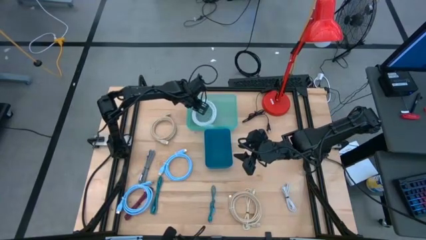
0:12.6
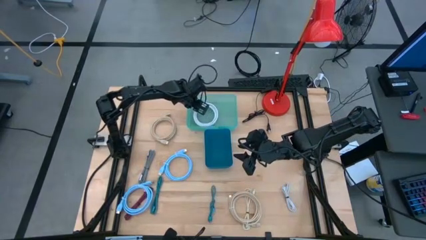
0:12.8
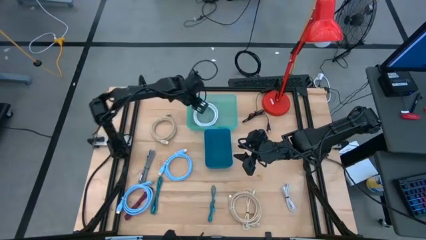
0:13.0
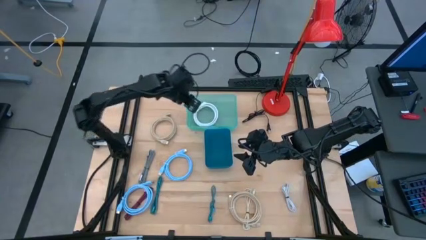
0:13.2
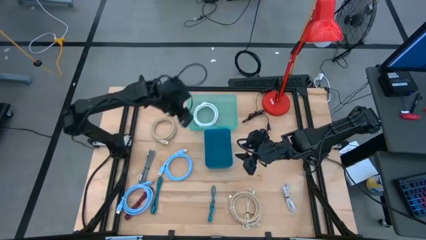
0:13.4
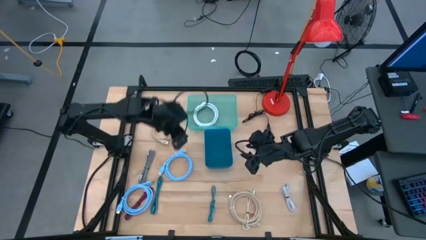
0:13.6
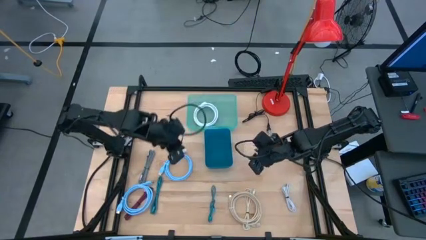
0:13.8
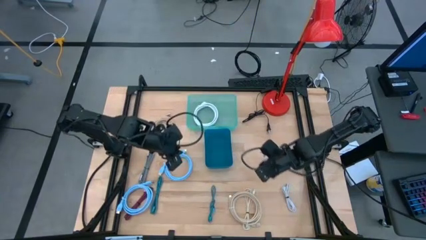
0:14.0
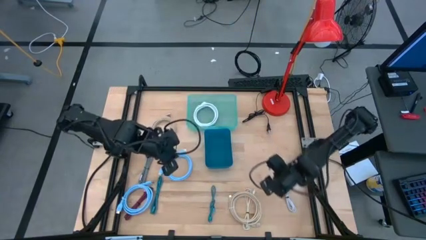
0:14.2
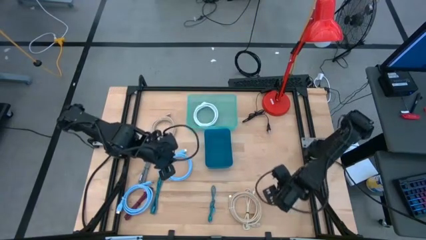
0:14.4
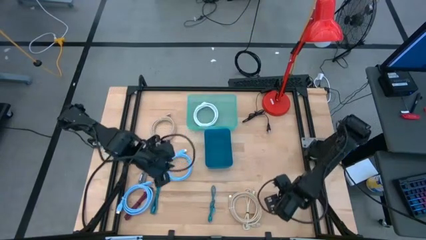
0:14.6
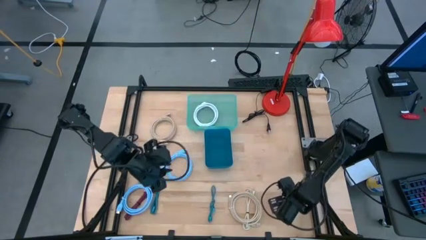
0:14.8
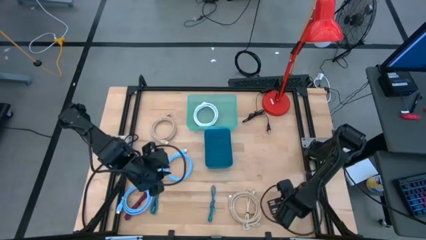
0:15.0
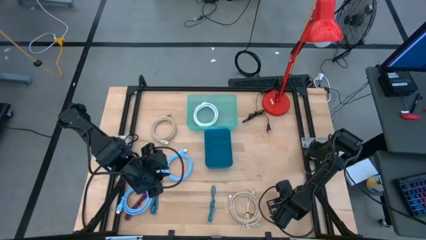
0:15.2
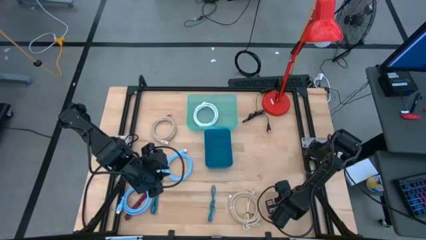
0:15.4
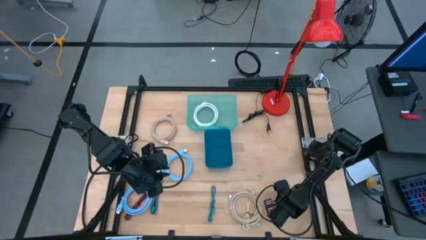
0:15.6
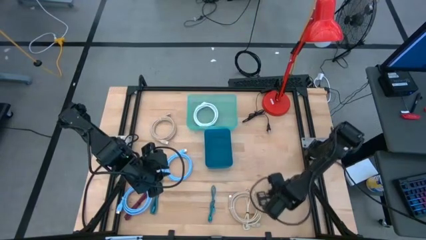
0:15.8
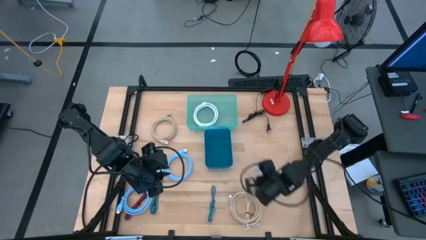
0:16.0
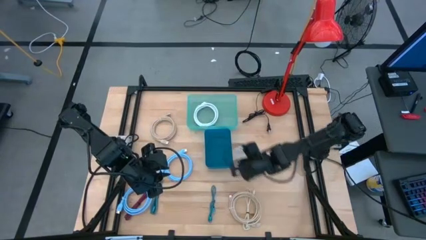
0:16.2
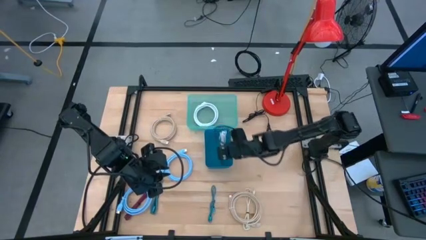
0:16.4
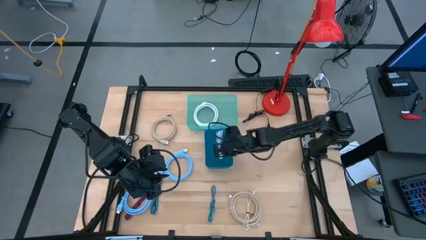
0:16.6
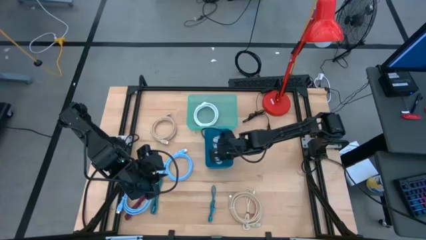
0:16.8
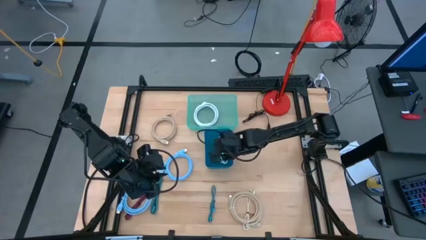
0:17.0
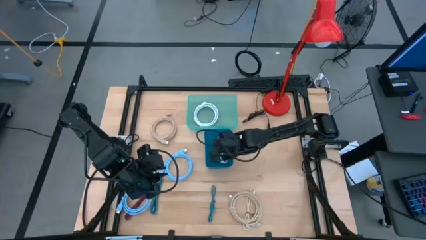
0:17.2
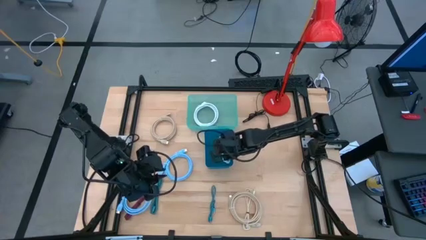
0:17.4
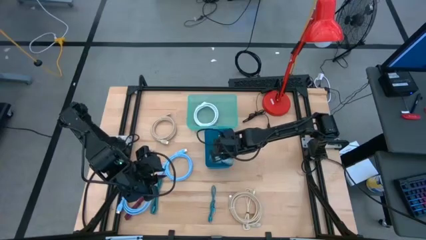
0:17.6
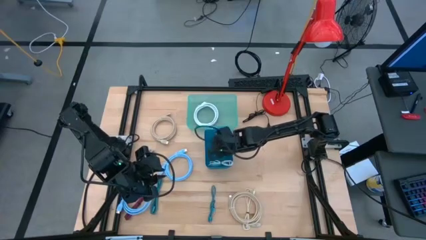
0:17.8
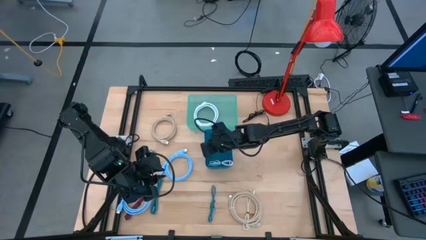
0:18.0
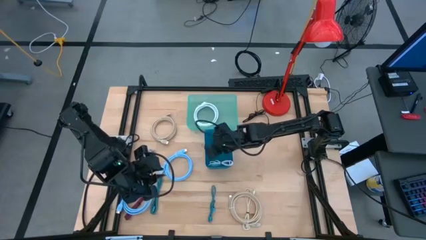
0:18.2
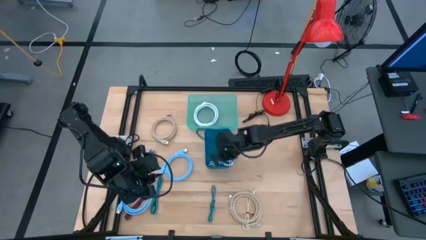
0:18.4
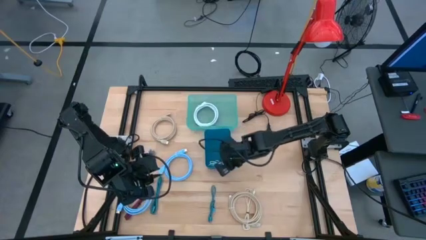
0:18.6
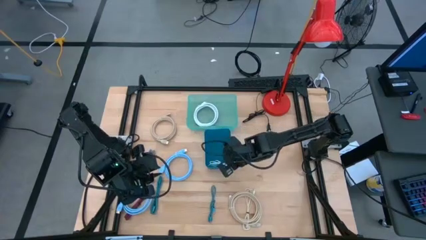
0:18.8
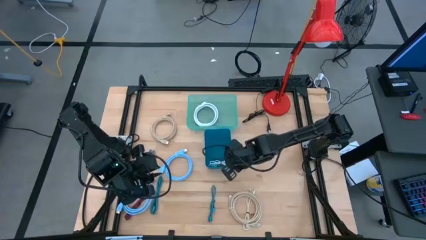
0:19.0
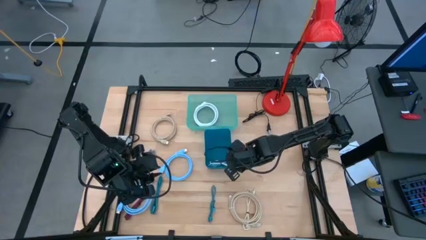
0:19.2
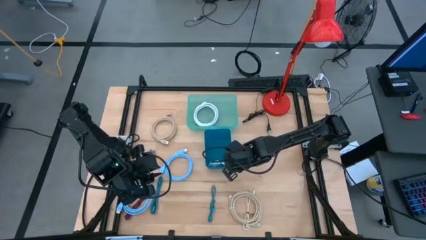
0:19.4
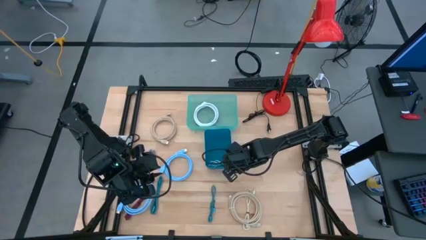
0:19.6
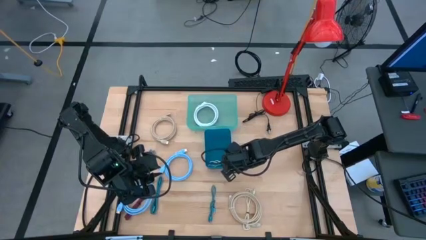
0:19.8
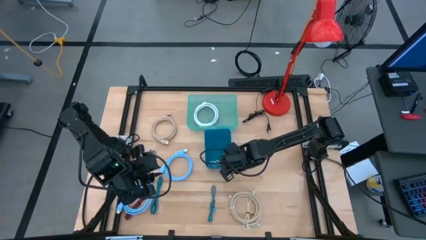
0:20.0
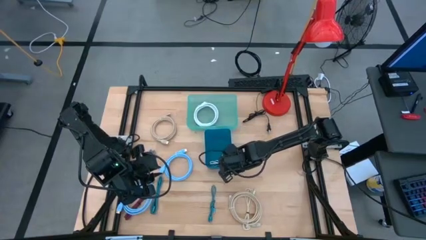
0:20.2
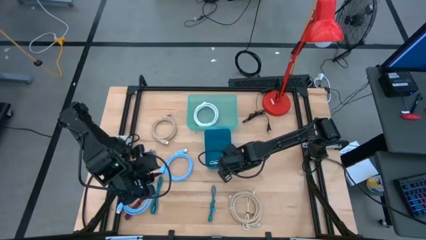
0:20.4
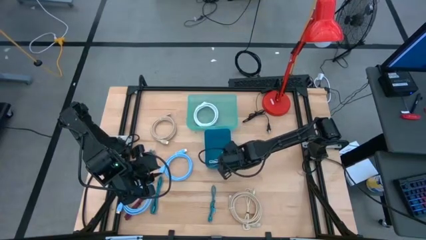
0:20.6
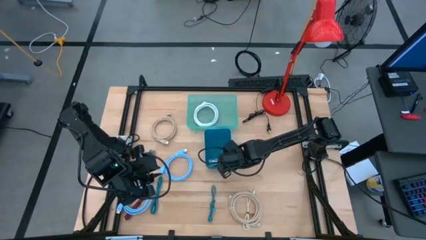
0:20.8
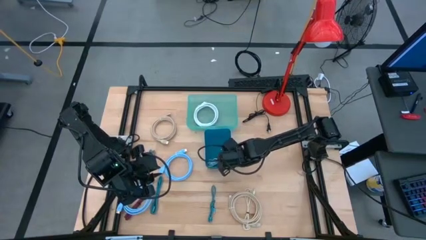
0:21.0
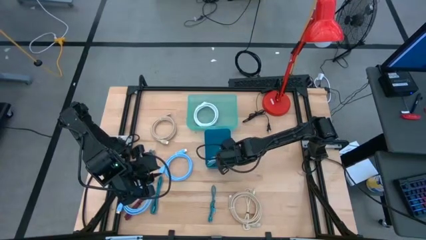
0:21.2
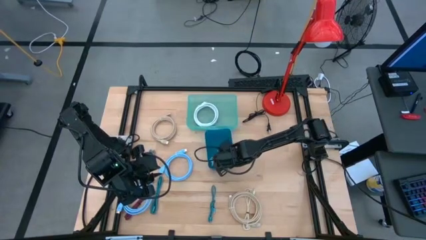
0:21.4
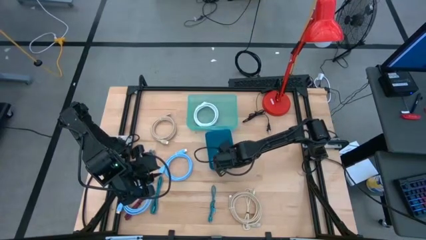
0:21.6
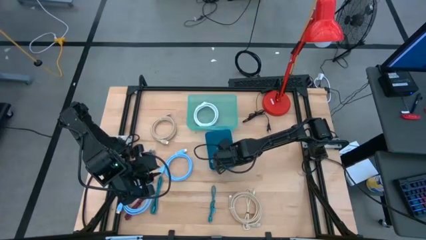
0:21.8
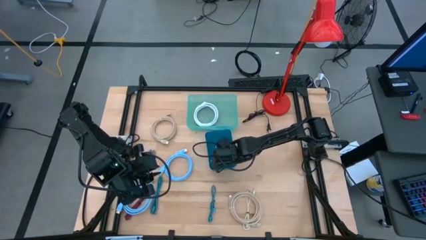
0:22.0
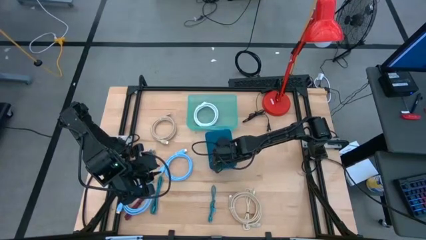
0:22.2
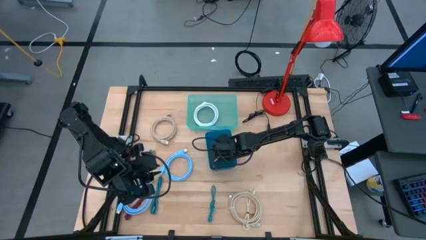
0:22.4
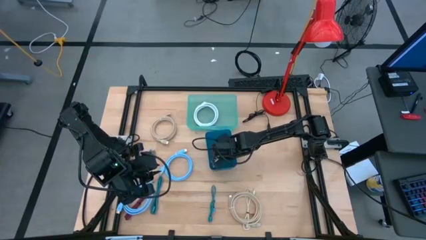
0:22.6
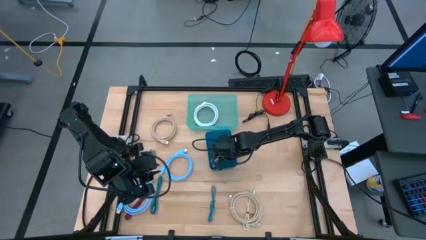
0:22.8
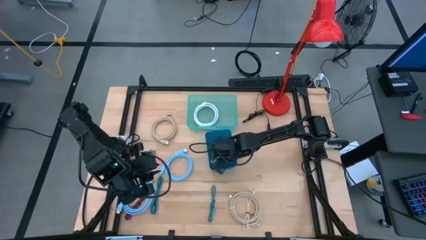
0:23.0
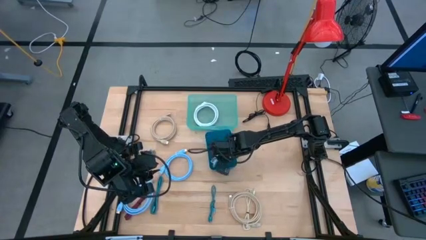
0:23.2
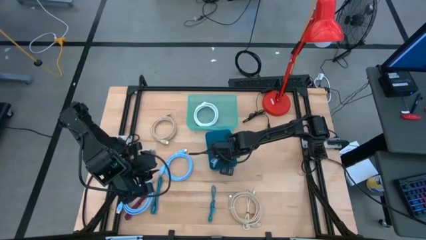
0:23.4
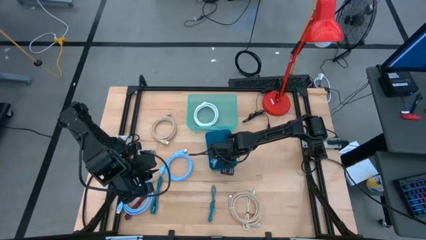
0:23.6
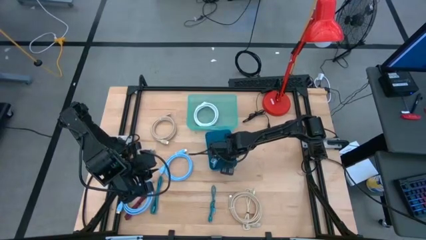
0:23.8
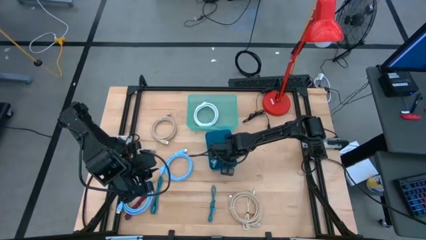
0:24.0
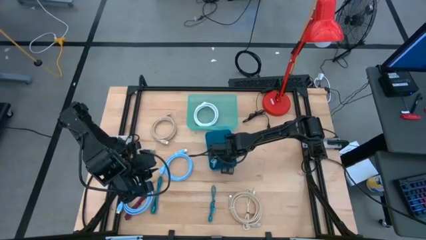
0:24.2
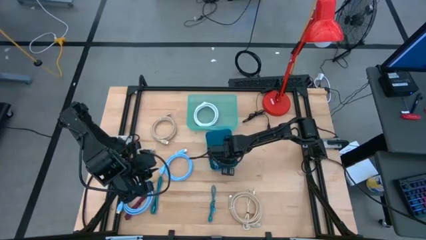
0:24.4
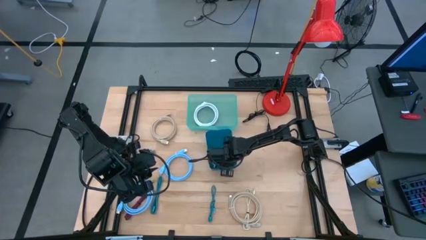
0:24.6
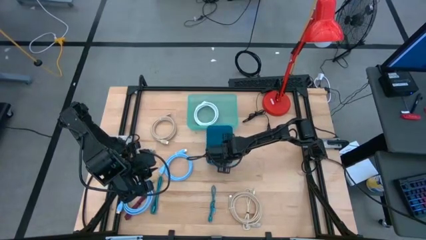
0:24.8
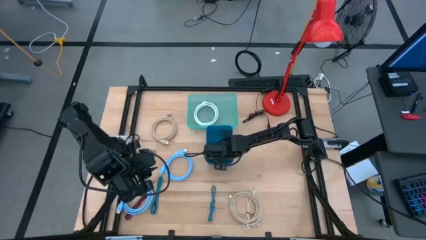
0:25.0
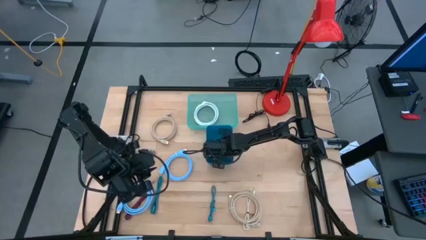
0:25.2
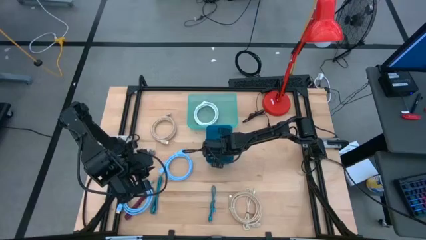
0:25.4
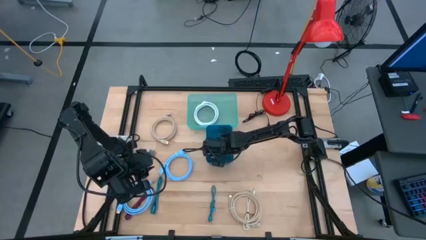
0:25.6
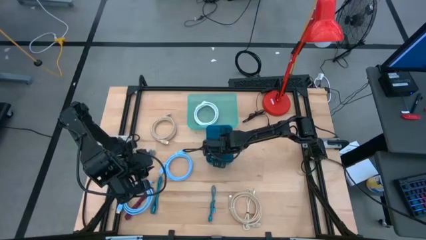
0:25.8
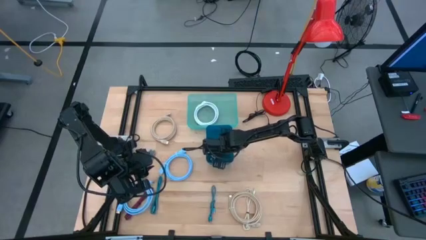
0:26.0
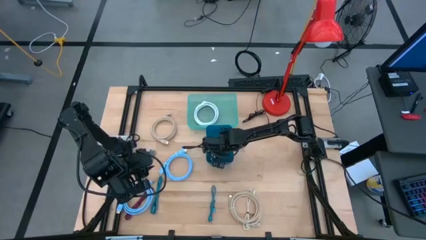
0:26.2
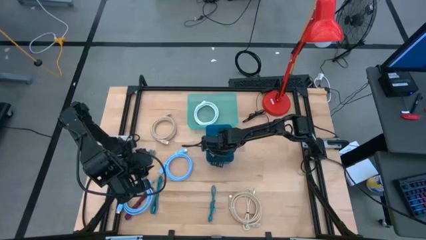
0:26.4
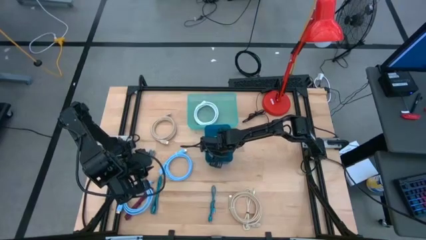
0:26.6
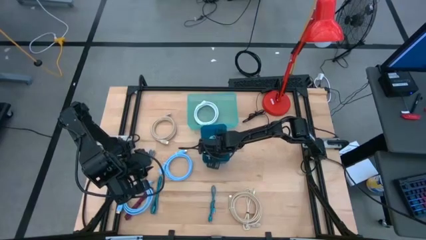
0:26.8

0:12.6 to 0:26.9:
Task: Pick & Place USB Port
Put the white charger cable into the blue bin
